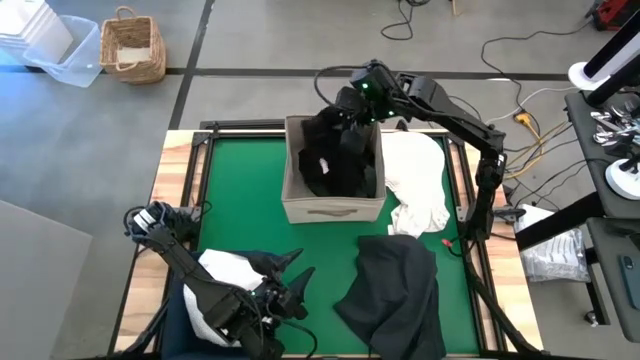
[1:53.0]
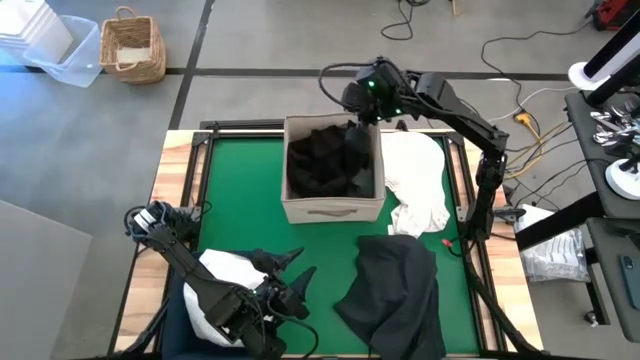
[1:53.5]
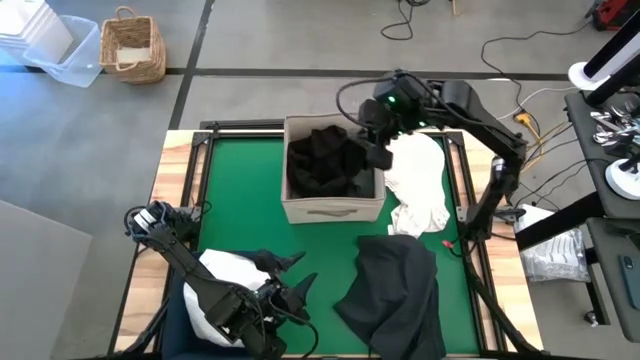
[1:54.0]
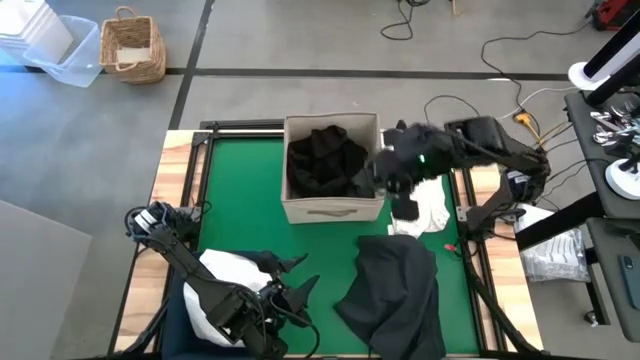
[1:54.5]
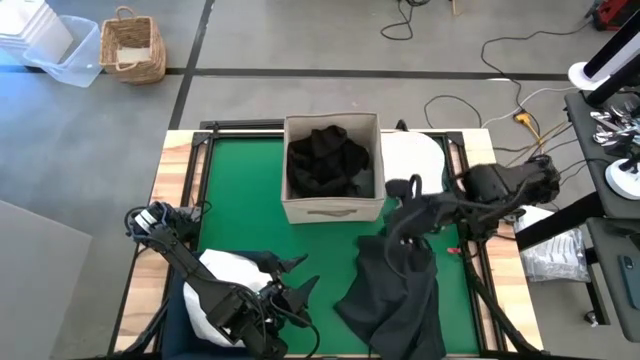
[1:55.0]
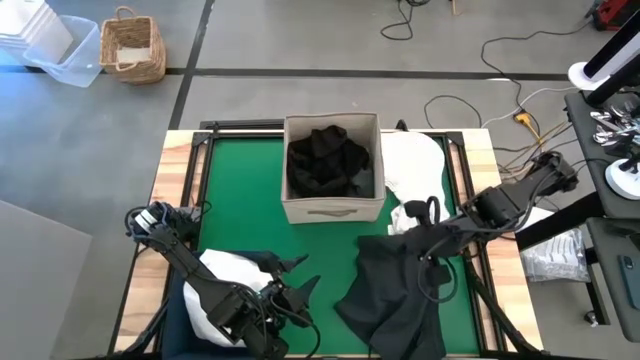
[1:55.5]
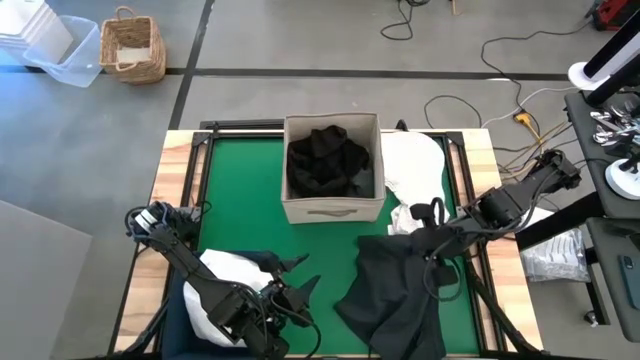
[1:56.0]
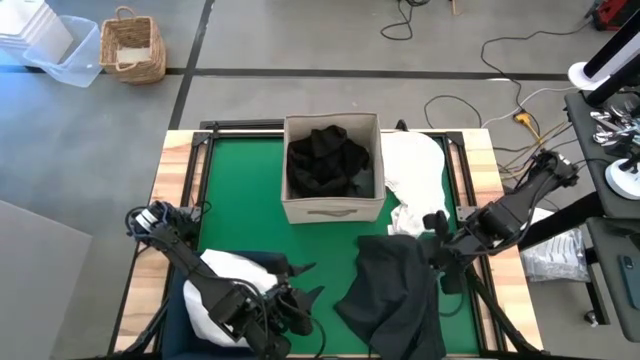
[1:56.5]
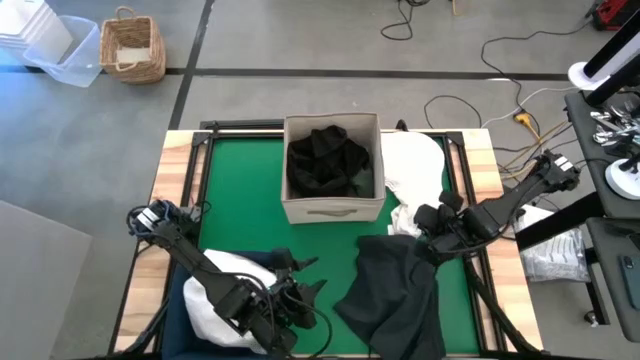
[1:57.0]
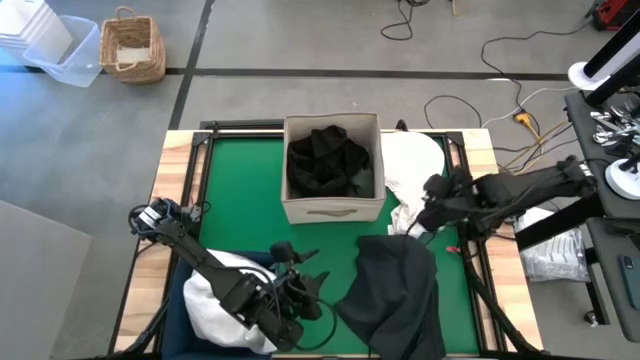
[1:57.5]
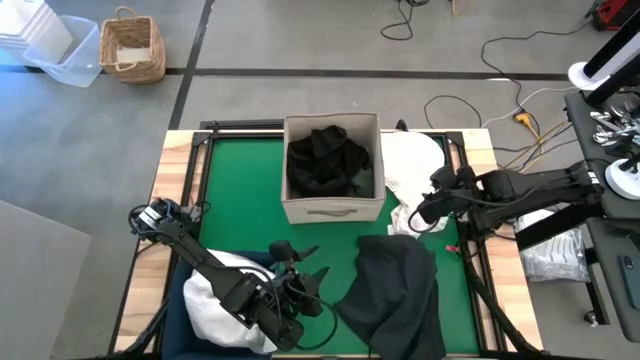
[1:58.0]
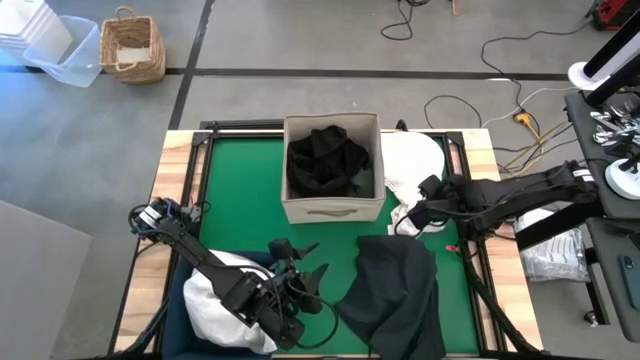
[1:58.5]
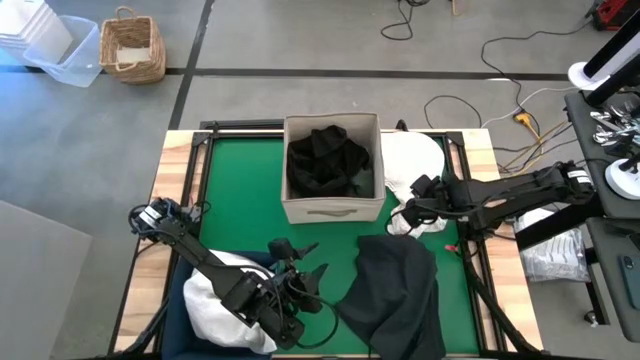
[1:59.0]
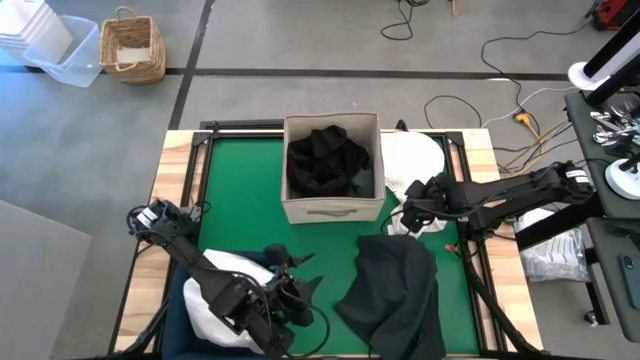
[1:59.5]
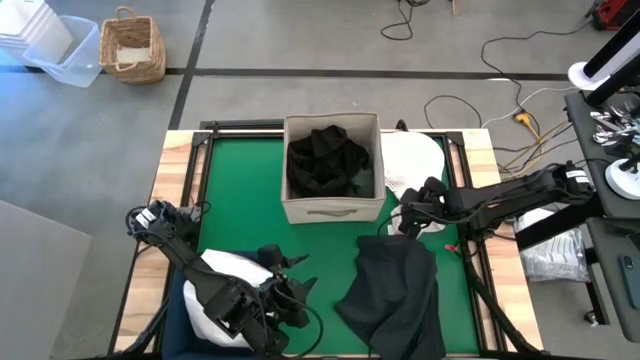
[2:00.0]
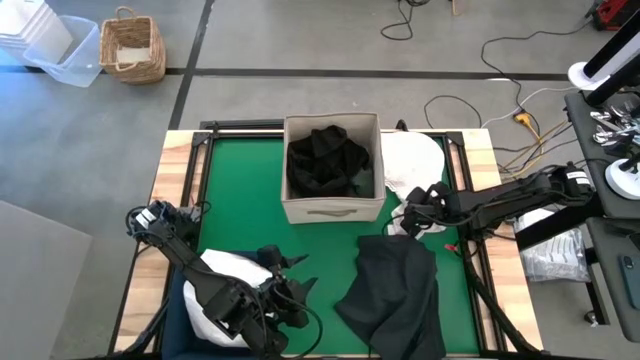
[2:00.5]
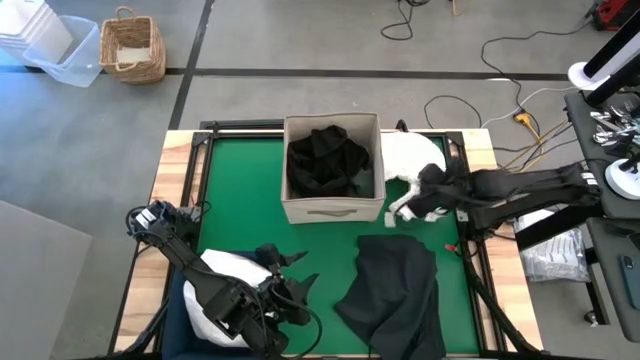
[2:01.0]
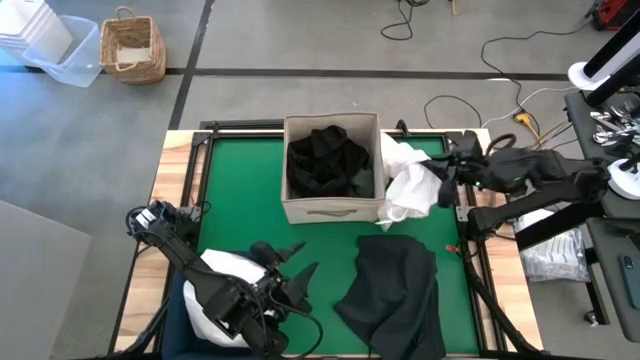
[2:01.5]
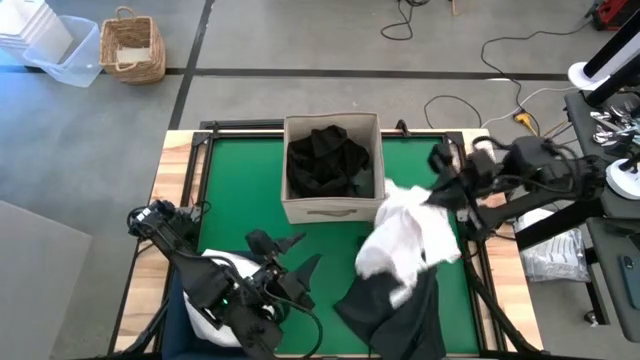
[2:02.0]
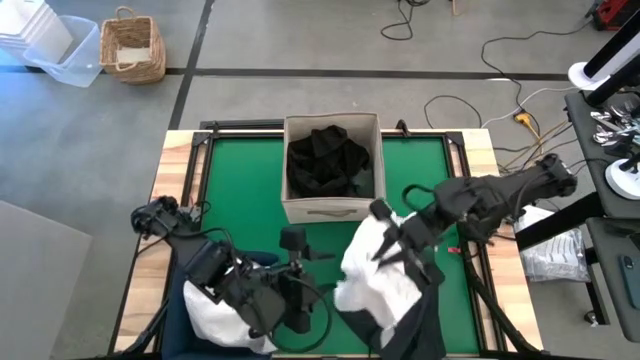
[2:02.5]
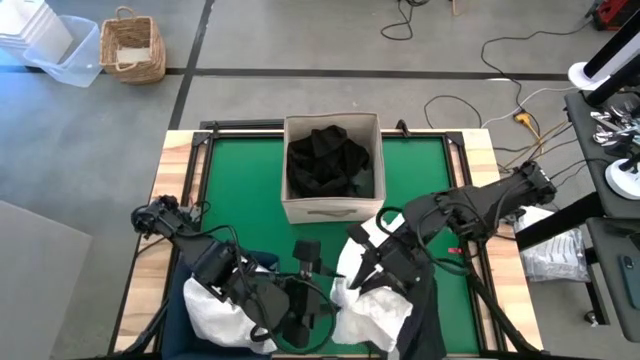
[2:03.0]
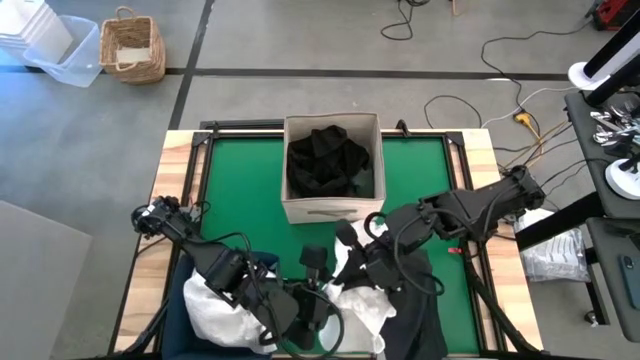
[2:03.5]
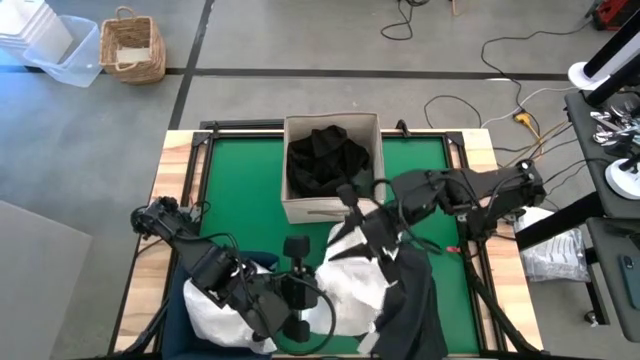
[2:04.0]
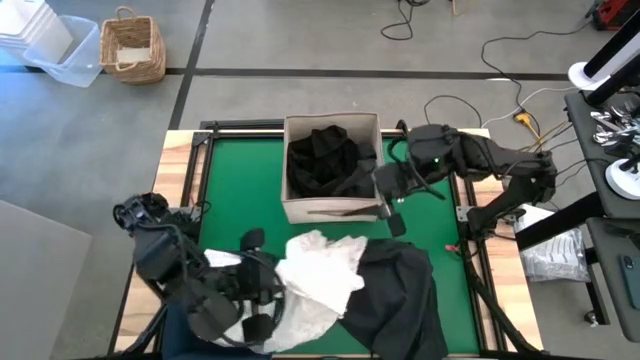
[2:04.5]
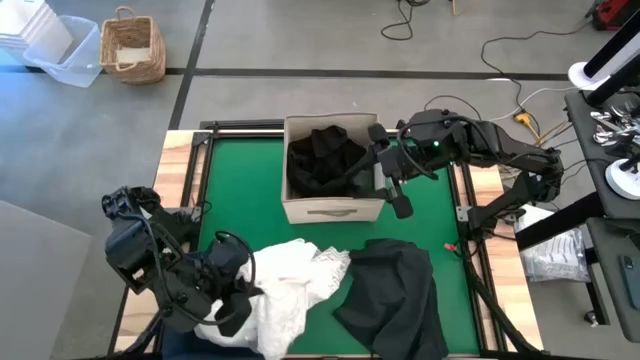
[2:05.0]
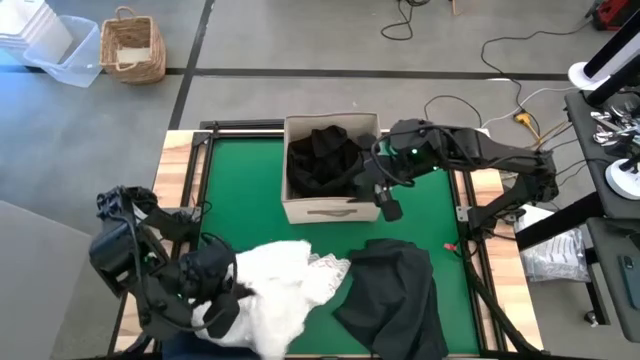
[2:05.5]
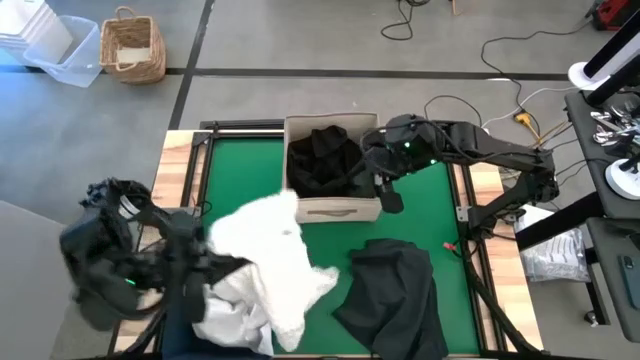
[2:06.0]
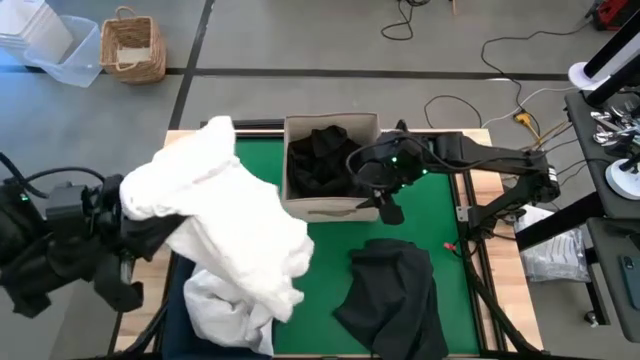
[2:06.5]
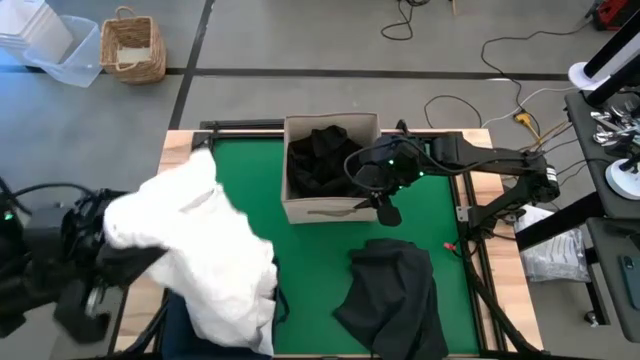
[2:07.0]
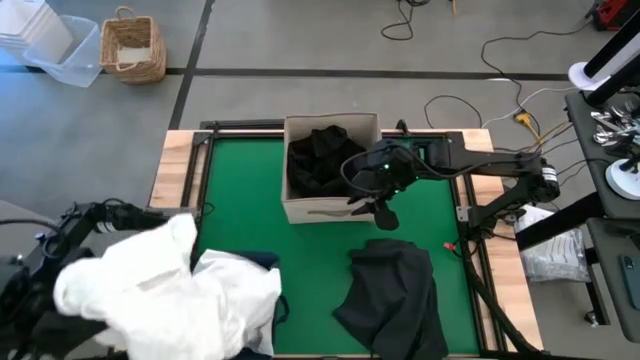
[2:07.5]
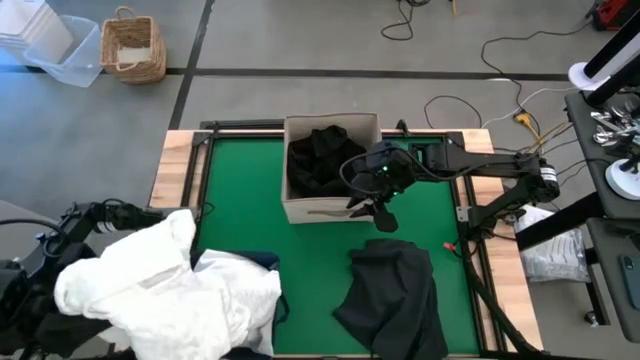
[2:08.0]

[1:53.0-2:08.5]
Put the white dress into the blue laundry bin

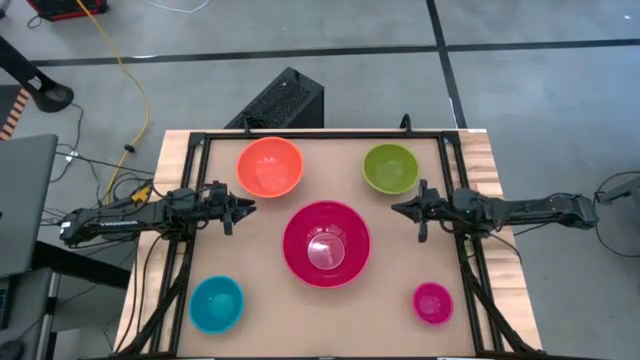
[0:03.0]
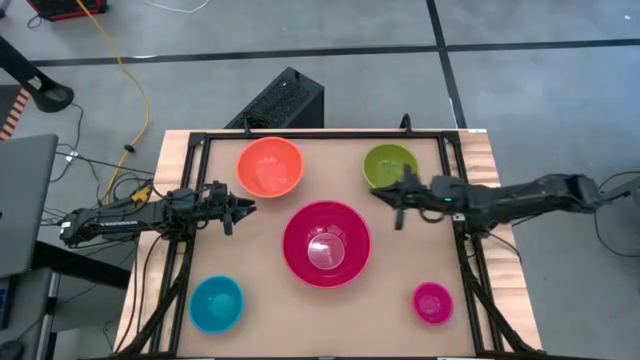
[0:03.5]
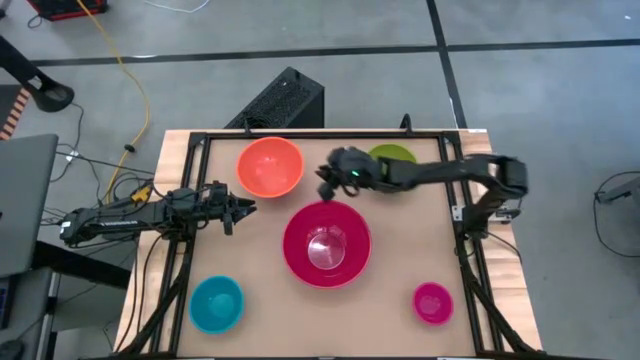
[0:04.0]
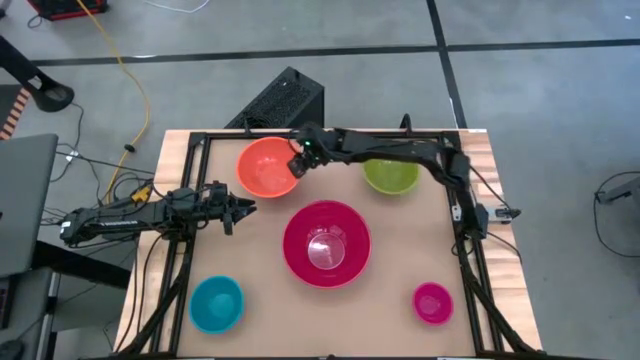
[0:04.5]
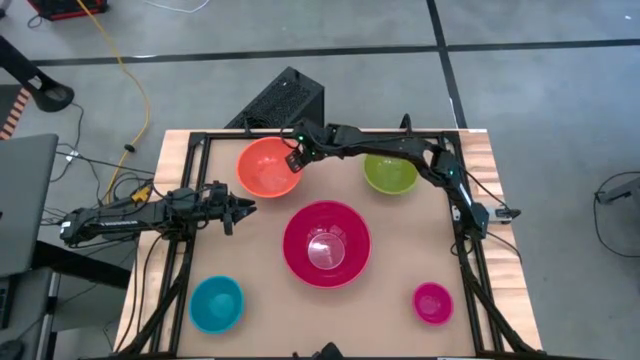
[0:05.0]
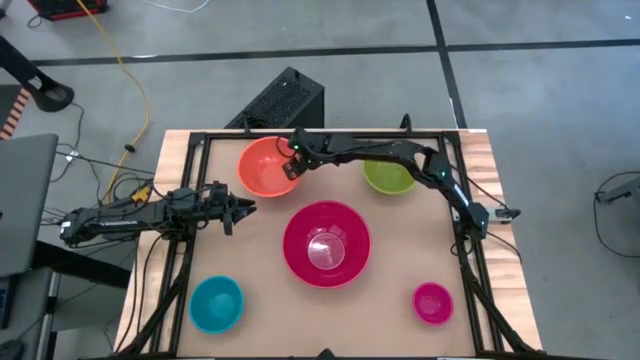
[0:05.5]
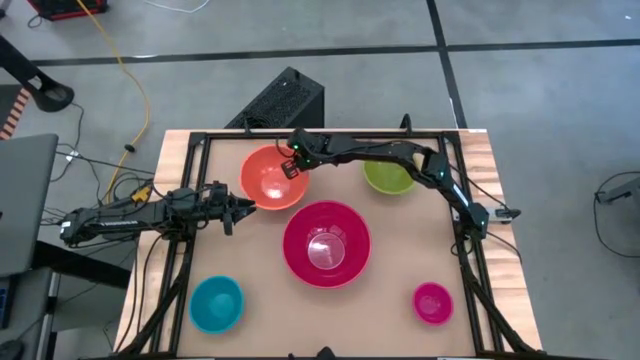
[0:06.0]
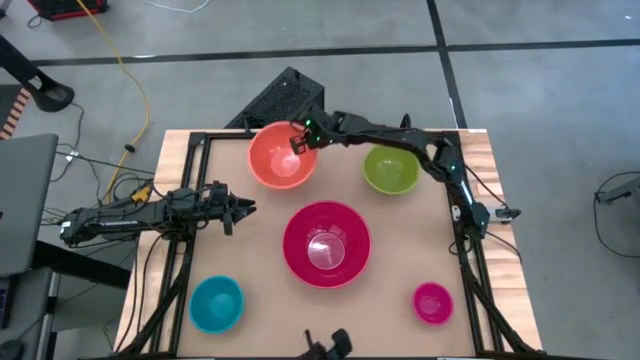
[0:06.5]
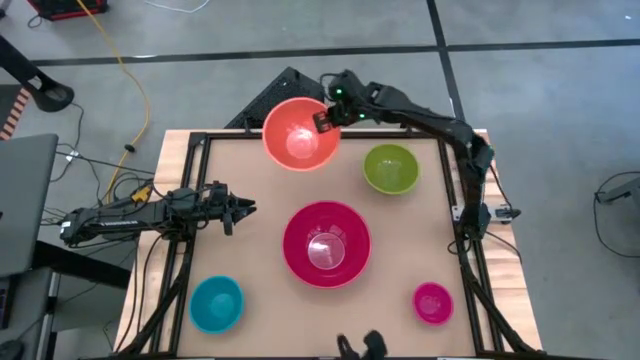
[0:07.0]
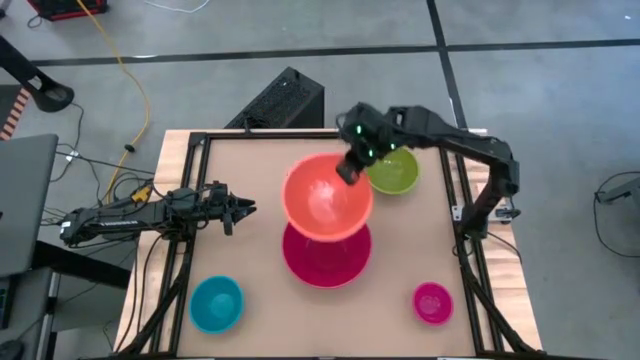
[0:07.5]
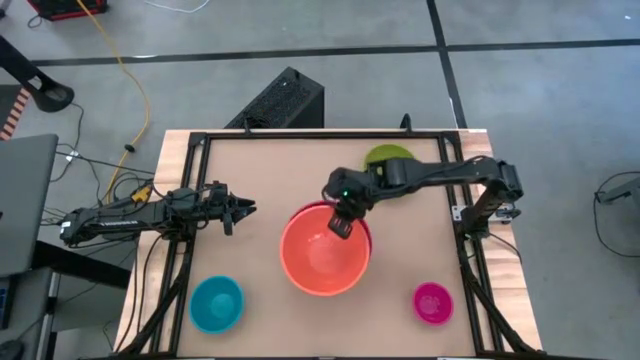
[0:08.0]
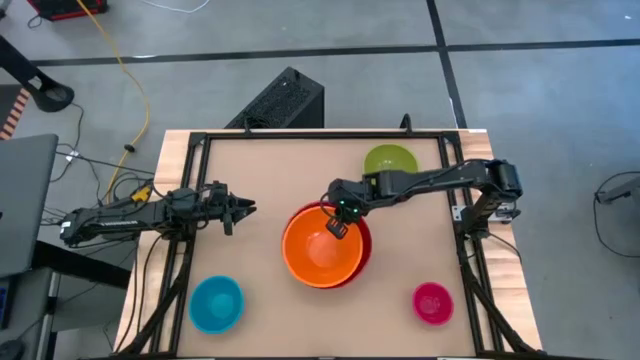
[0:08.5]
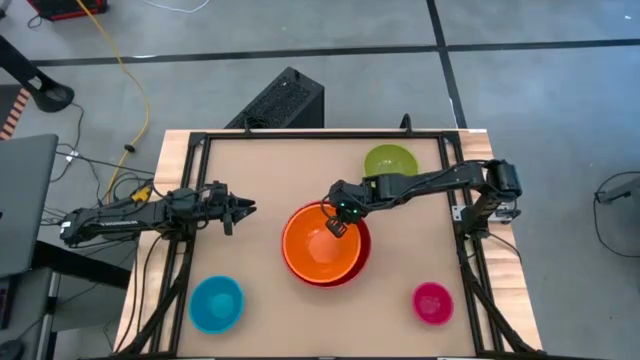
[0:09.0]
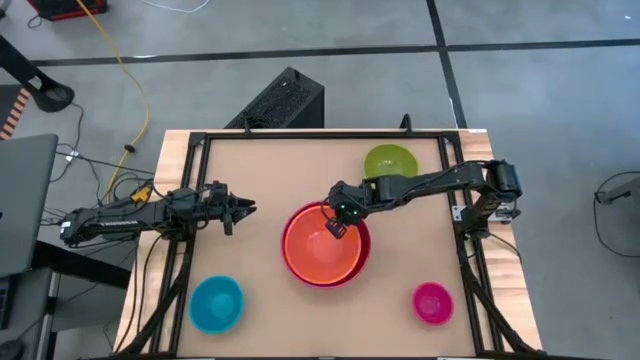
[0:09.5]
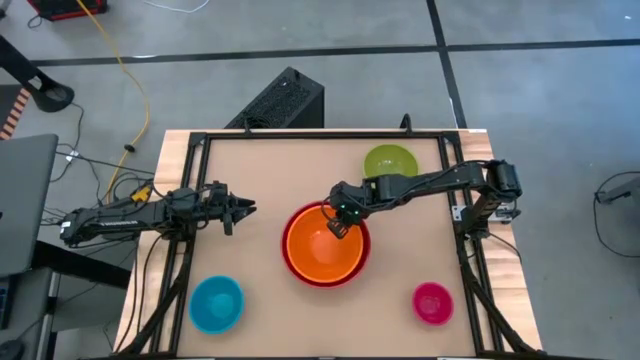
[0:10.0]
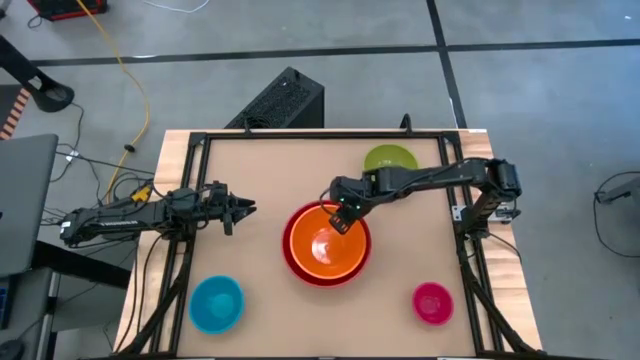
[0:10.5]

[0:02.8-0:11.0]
Stack the orange bowl on top of the red bowl
